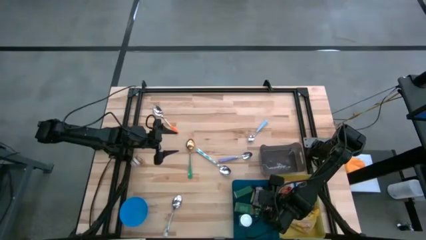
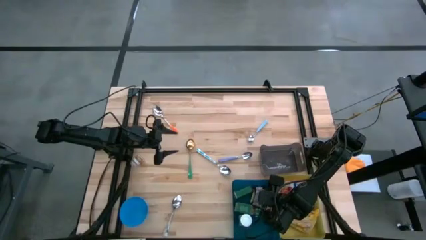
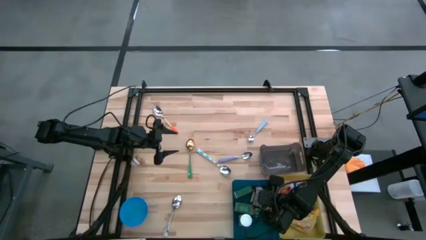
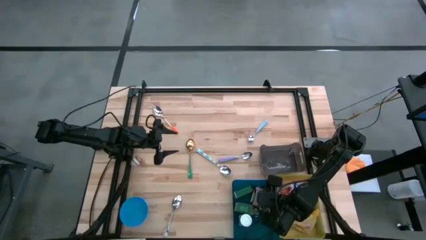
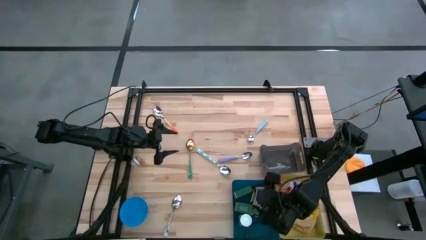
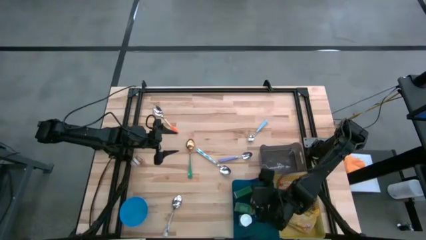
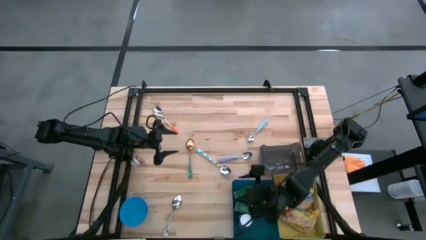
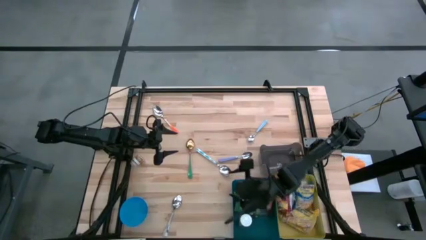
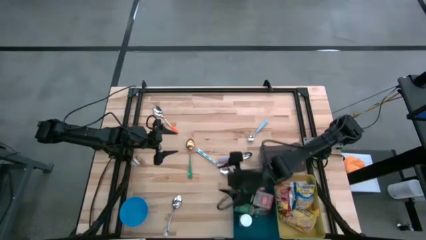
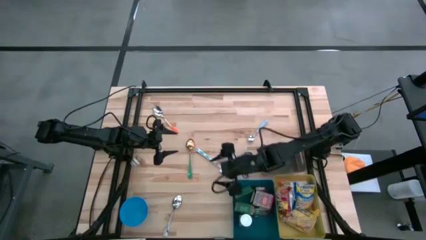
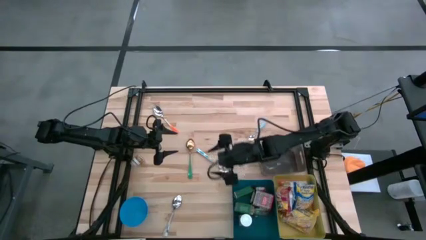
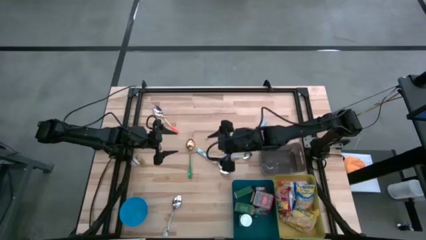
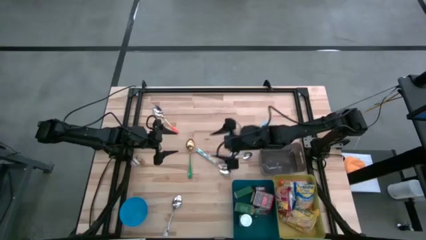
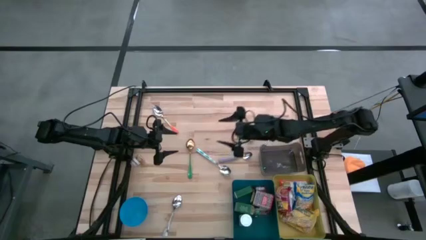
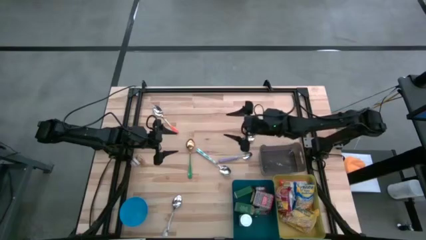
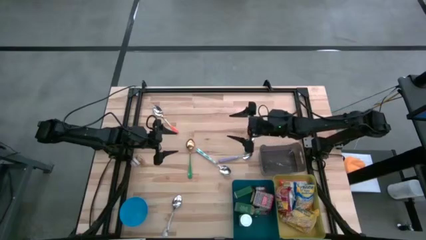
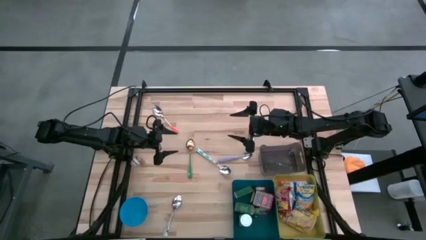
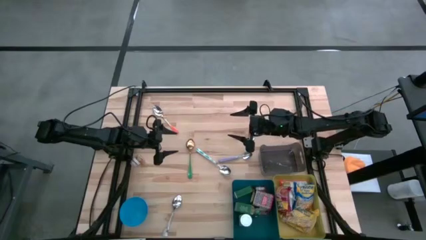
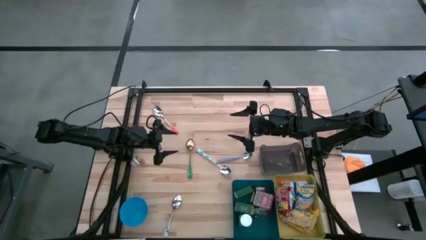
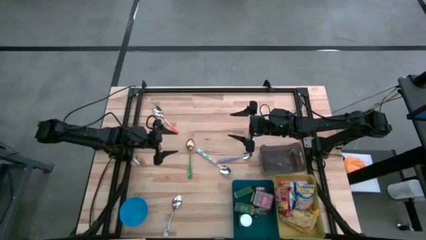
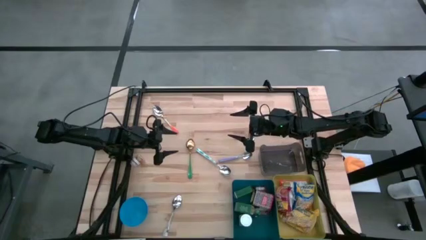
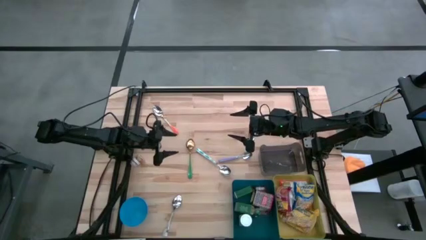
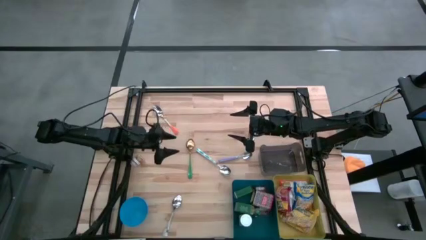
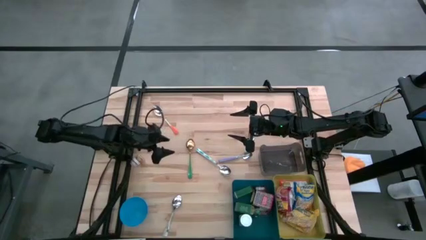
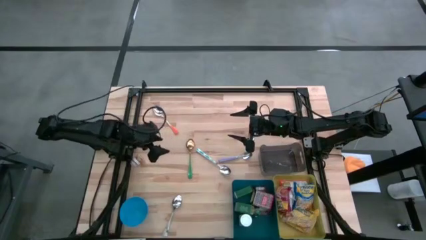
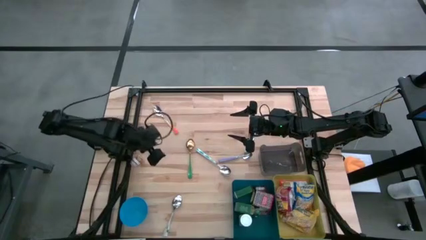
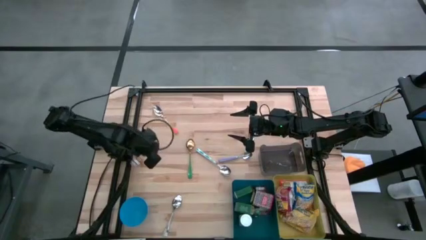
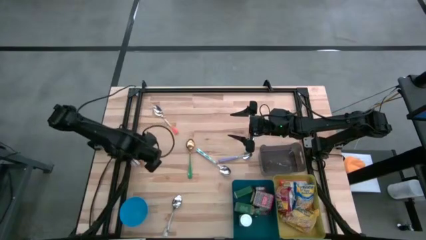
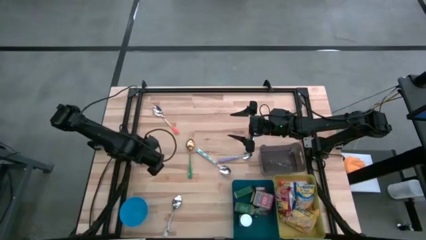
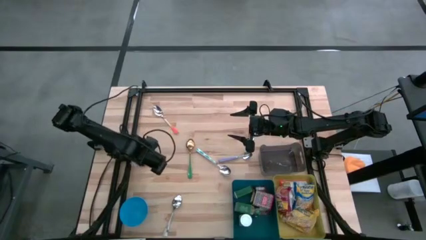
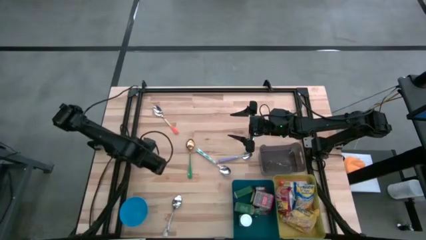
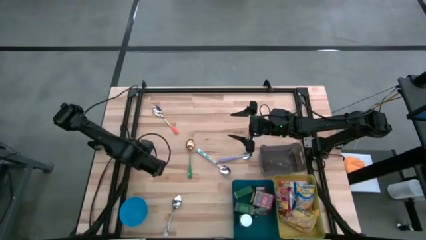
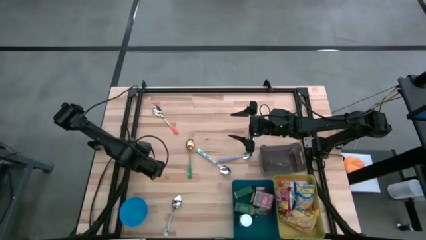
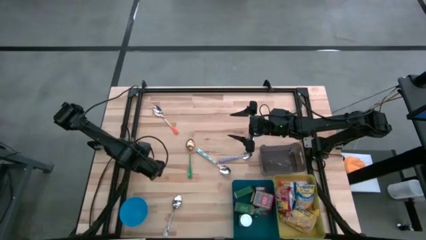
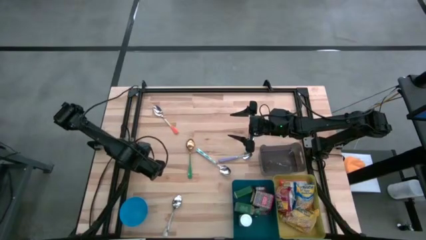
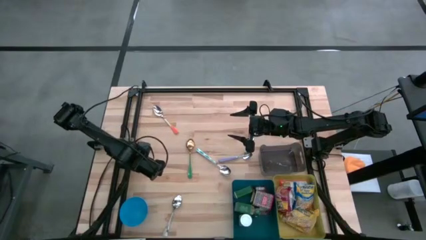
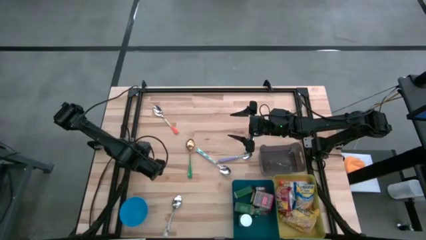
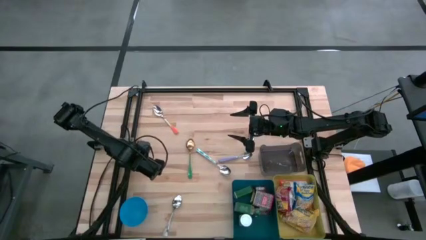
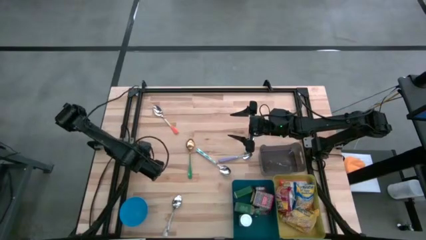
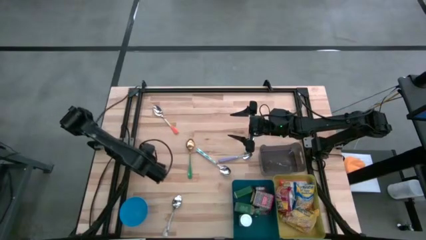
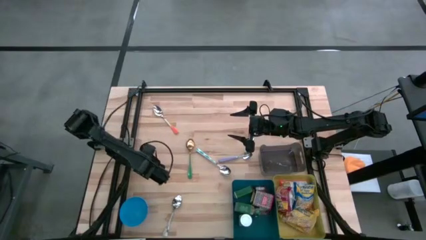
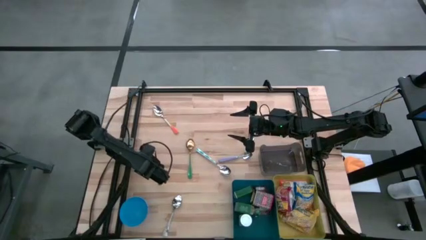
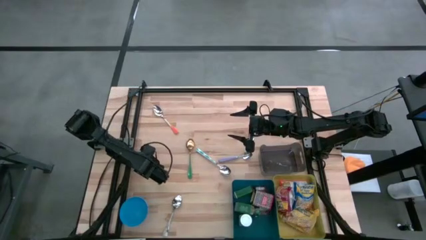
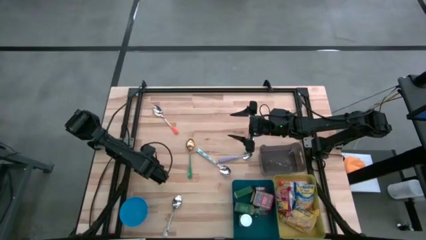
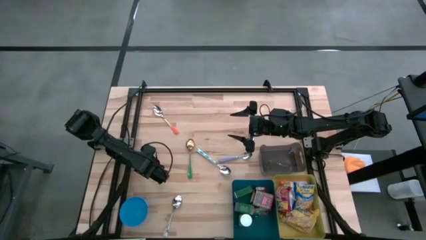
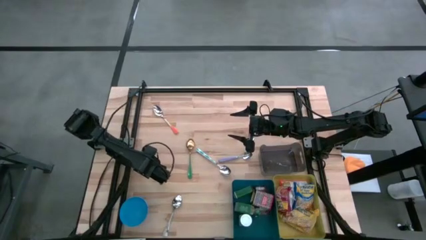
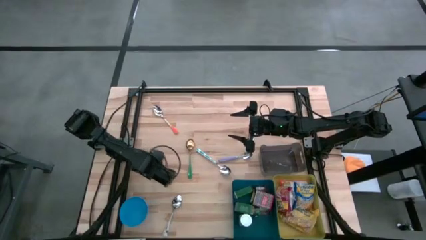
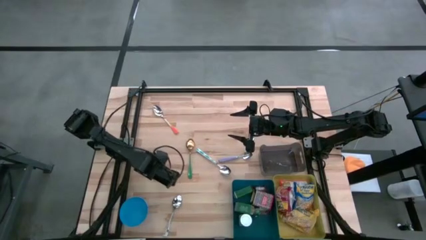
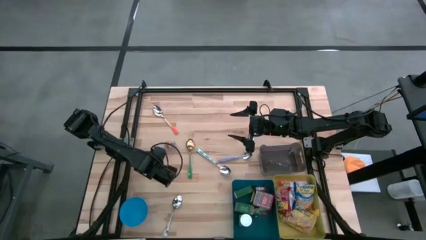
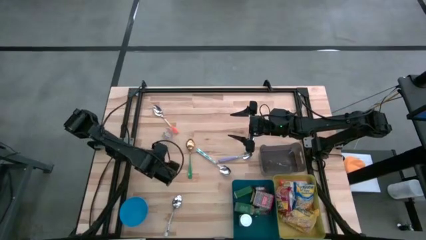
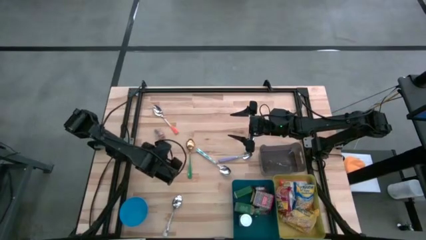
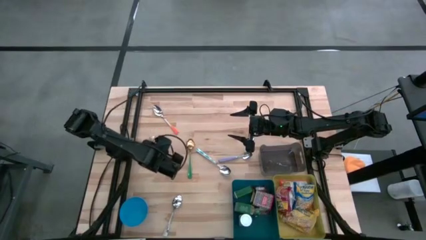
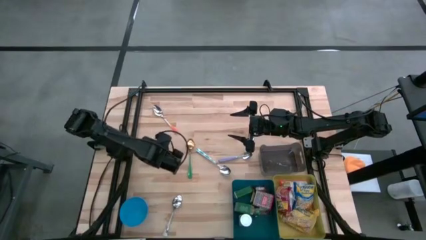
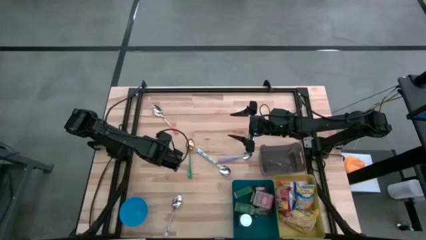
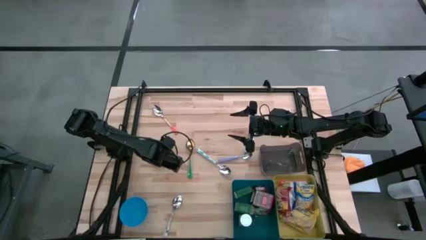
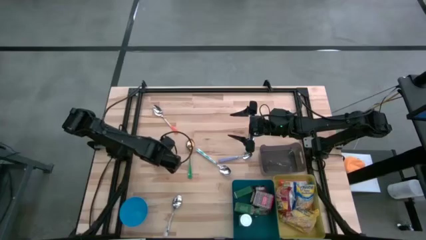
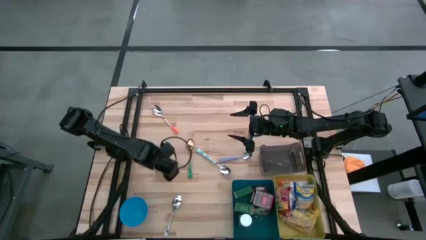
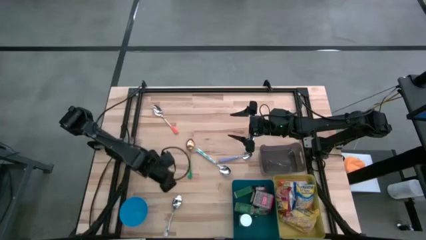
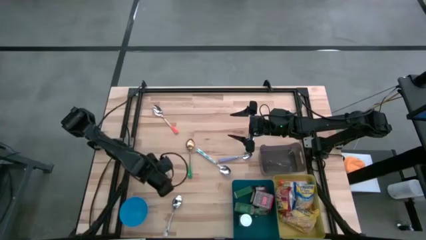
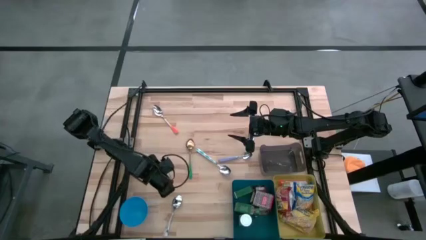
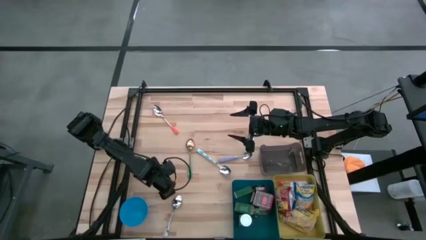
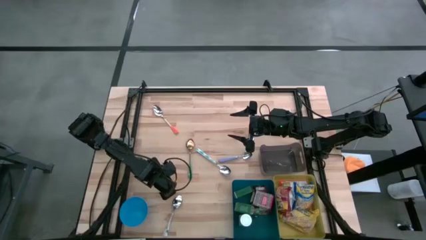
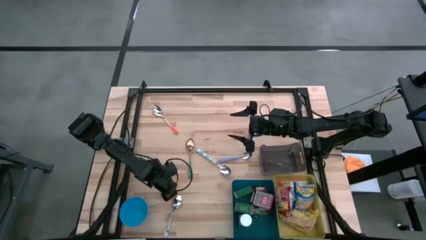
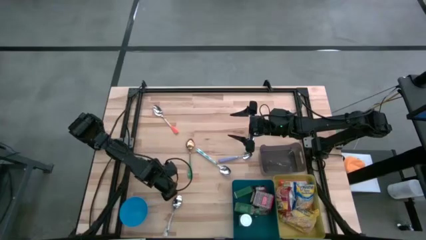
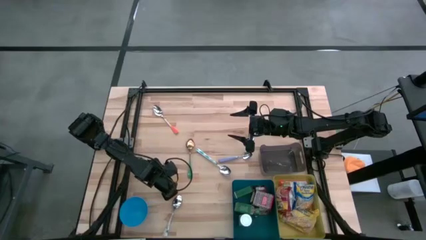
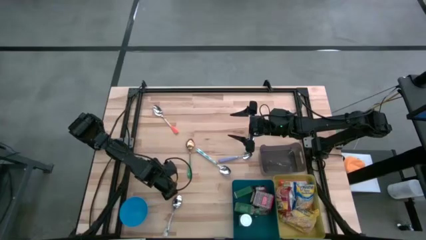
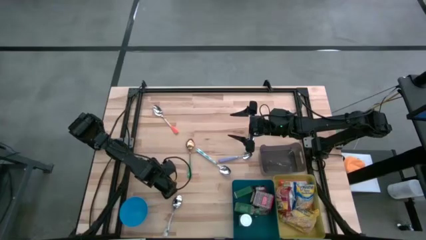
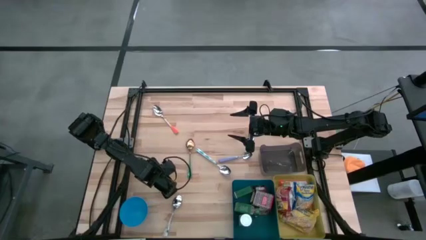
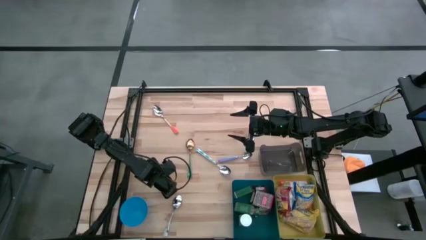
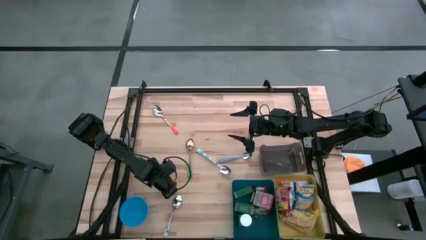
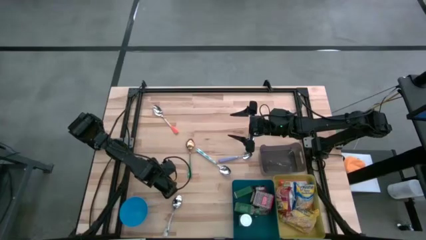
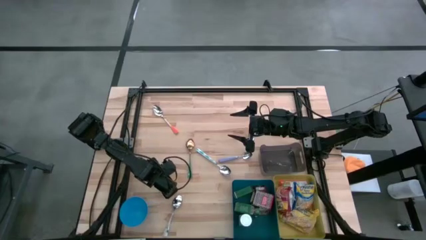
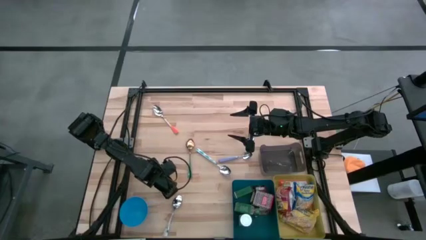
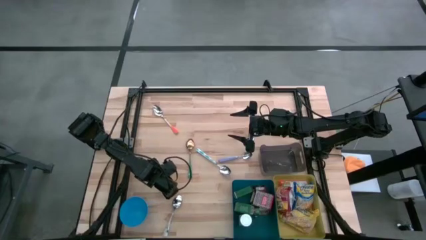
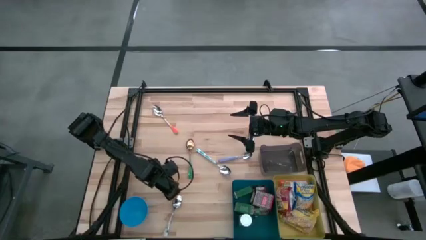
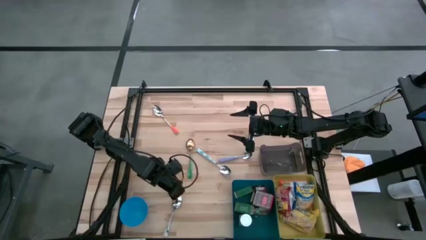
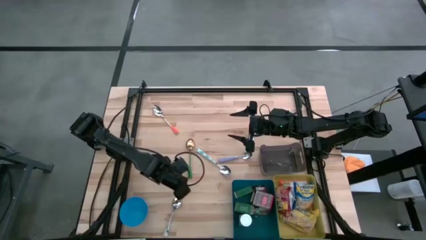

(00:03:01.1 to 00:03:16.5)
Put the brown seasoning bottle into the blue bin
